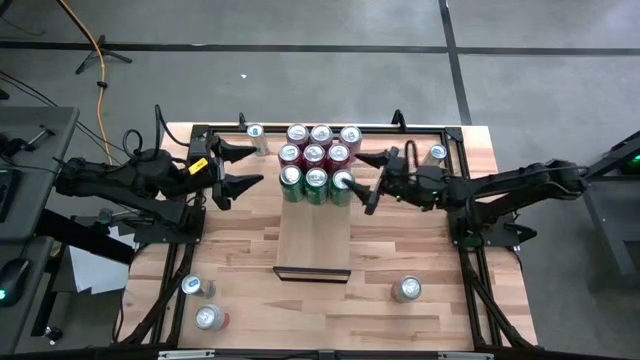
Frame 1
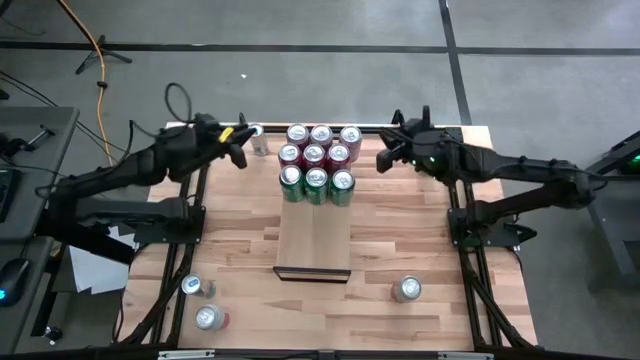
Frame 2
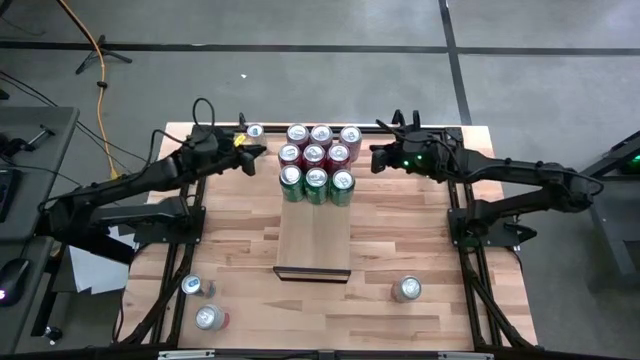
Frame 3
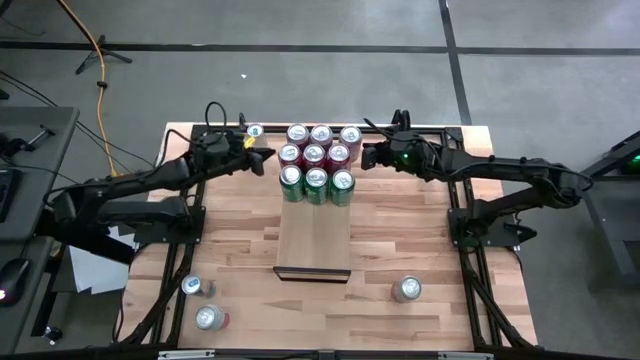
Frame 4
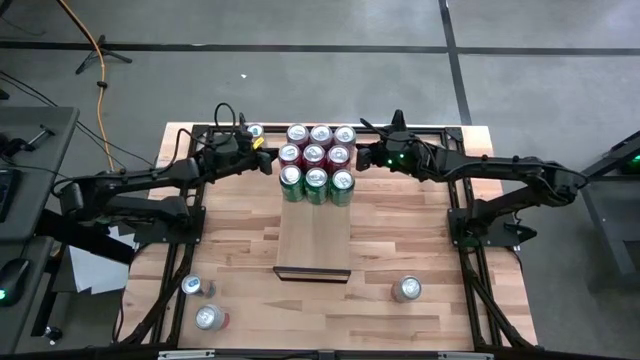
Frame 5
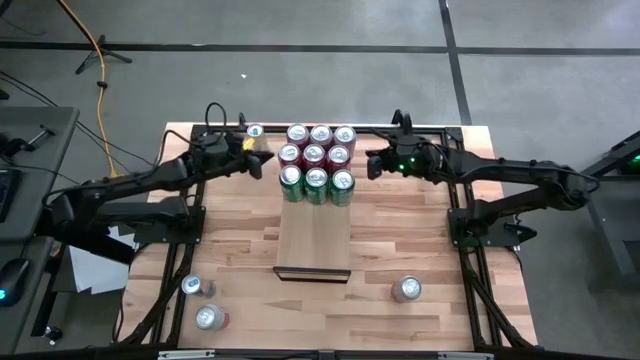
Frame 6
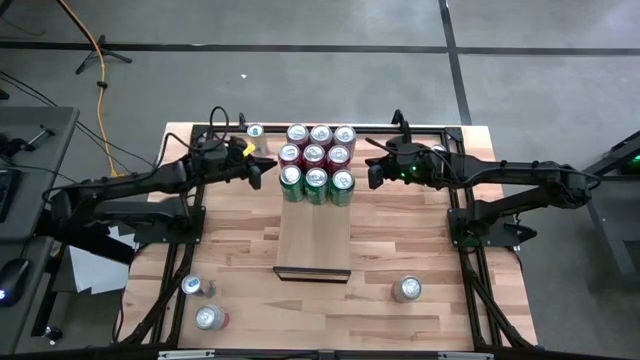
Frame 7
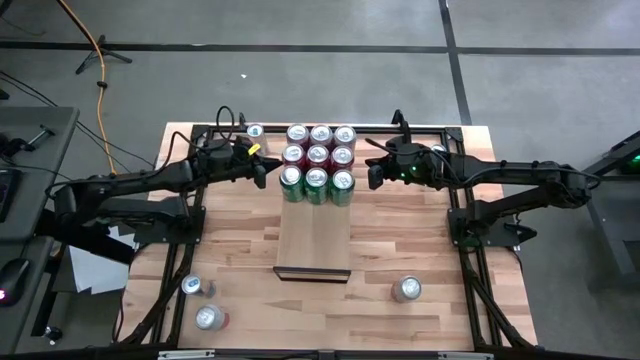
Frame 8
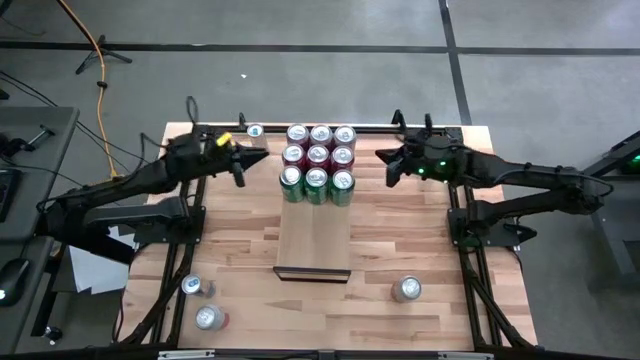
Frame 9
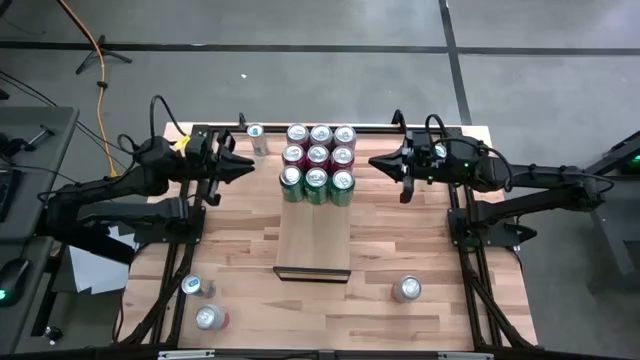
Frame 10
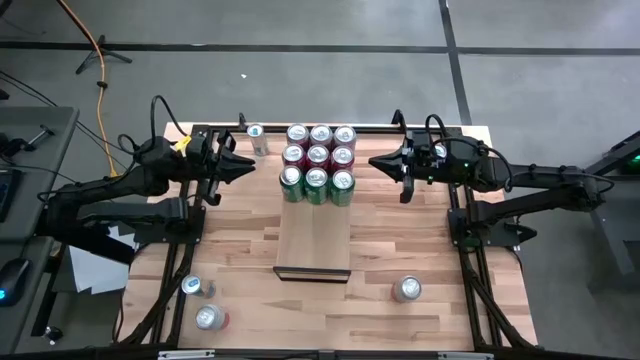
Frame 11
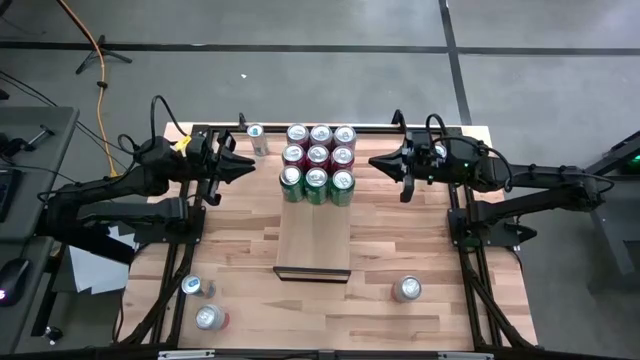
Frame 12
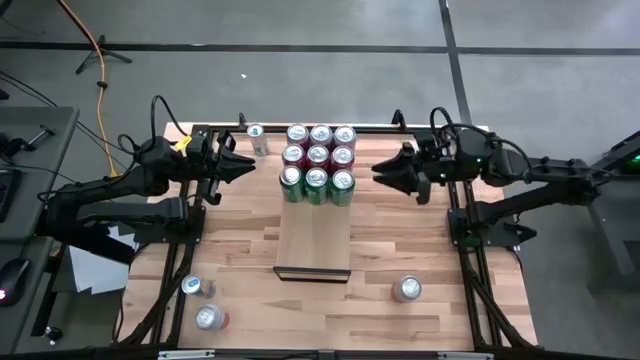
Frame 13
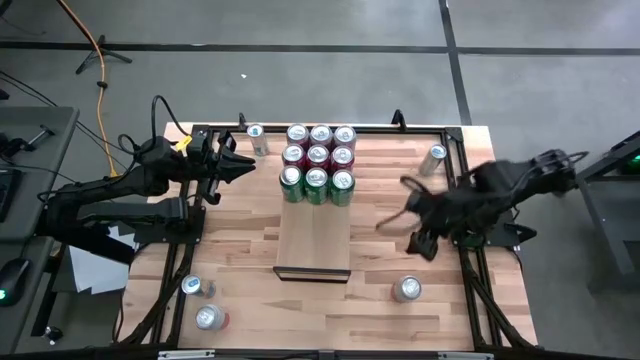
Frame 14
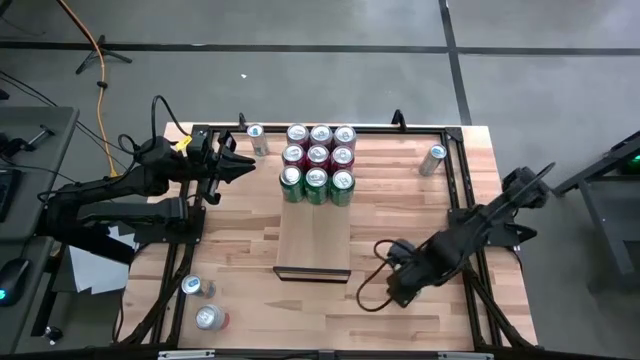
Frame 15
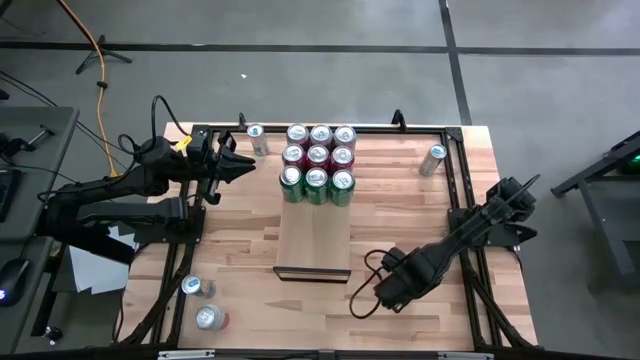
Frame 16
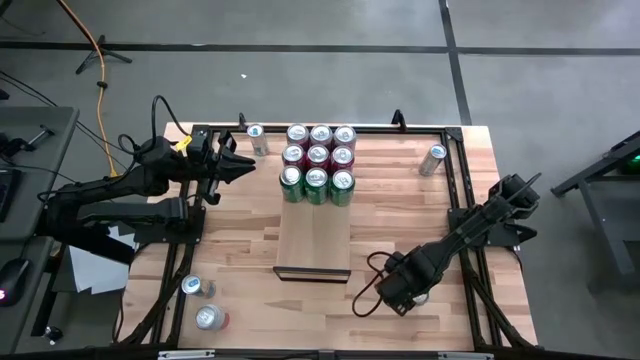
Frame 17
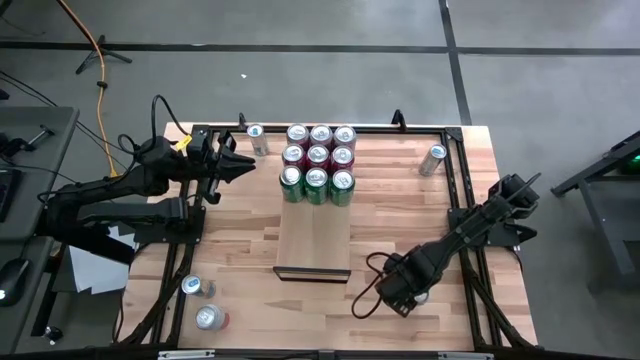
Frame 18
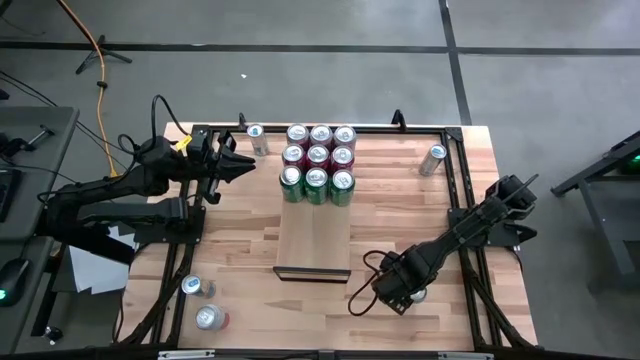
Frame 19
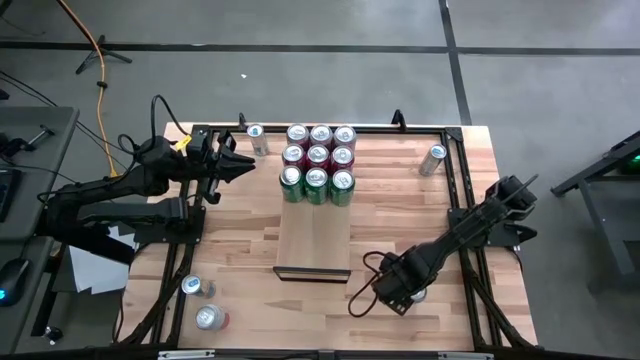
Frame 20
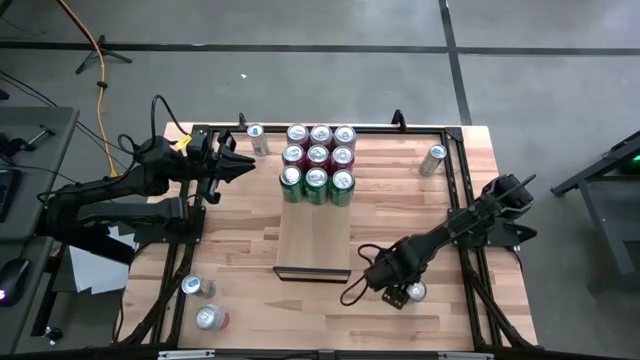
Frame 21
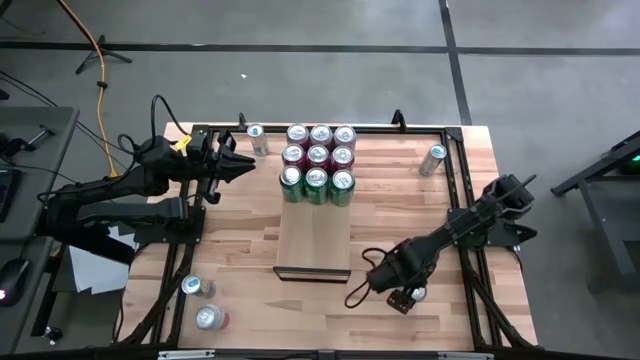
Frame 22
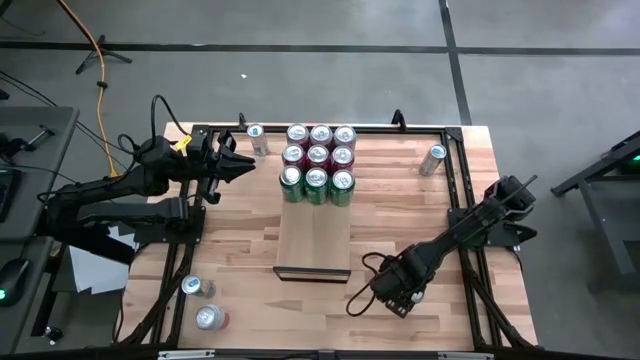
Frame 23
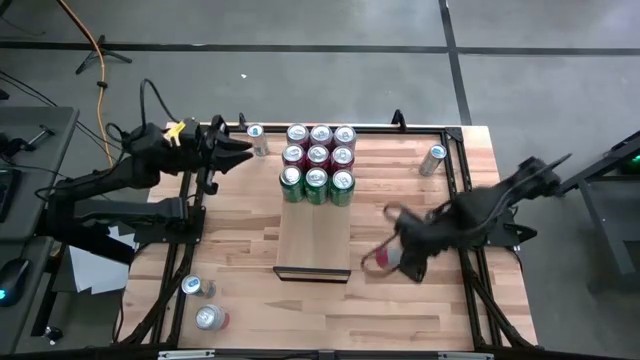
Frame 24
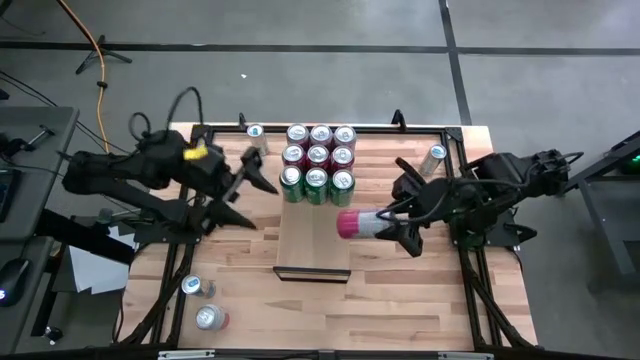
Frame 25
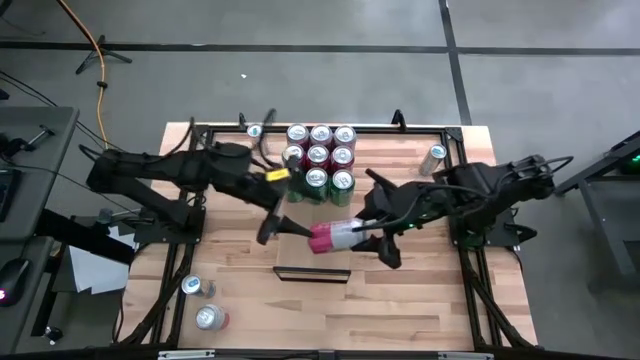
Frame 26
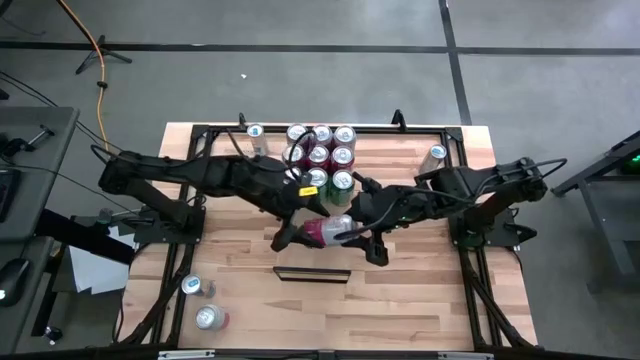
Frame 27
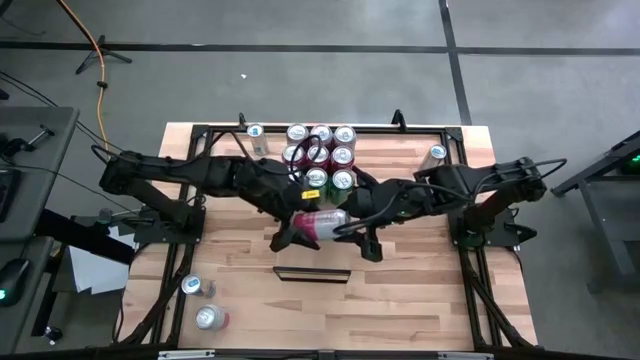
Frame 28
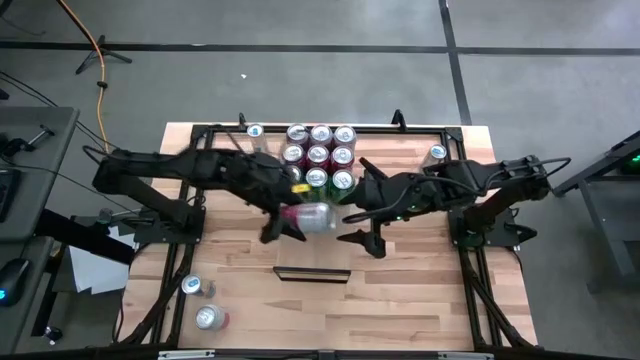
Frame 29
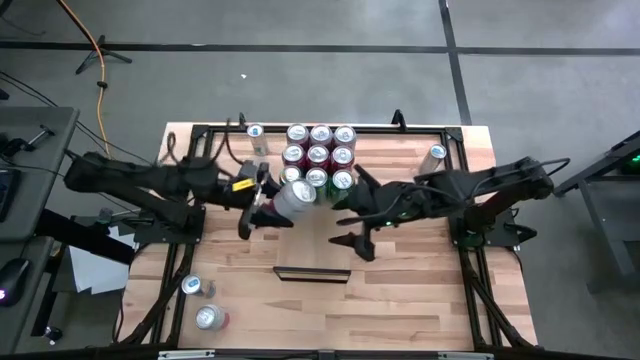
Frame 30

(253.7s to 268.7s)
Task: Place canned beverage on shelf
Put the bottom right pink white soda can on the shelf

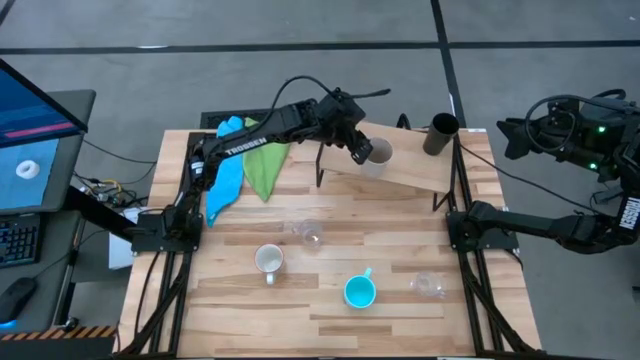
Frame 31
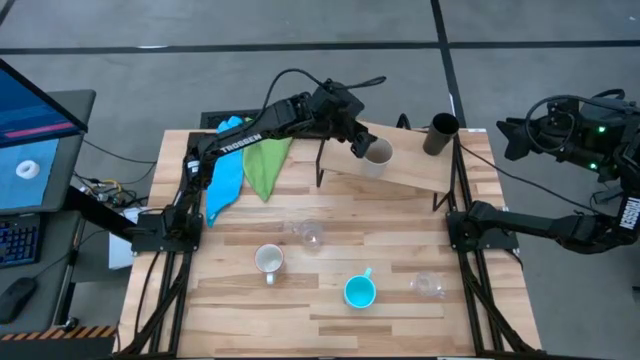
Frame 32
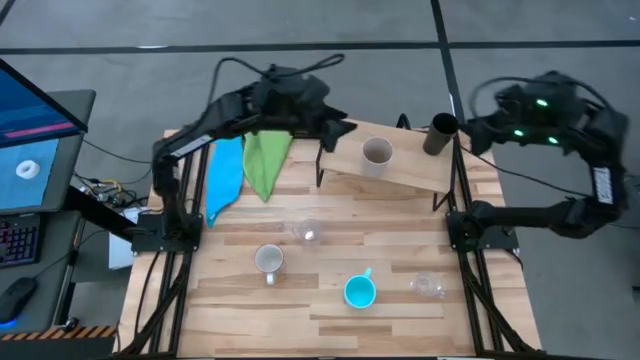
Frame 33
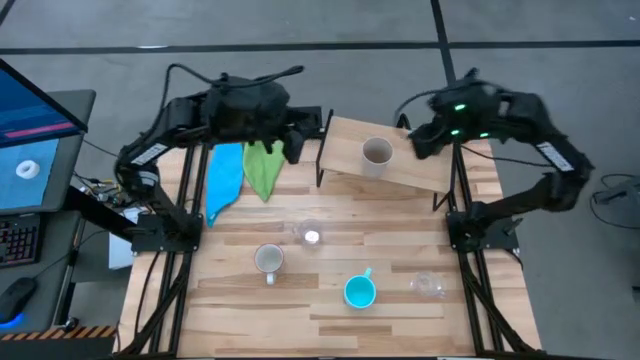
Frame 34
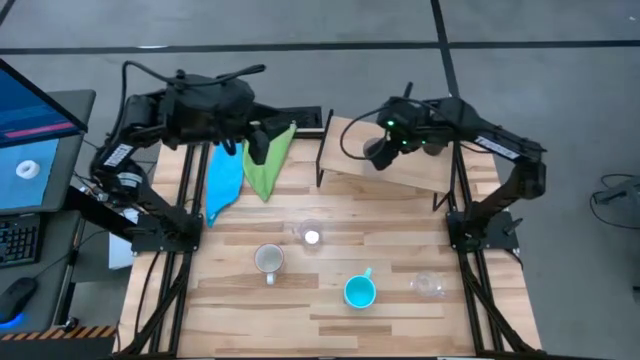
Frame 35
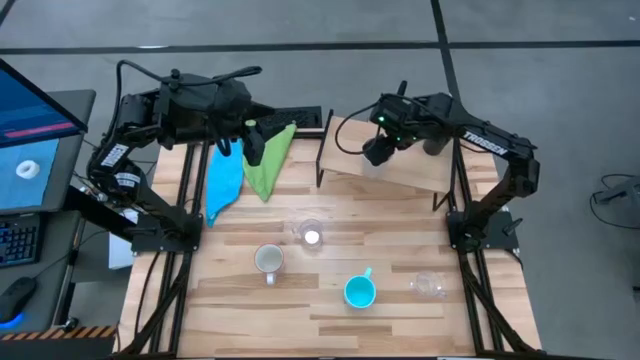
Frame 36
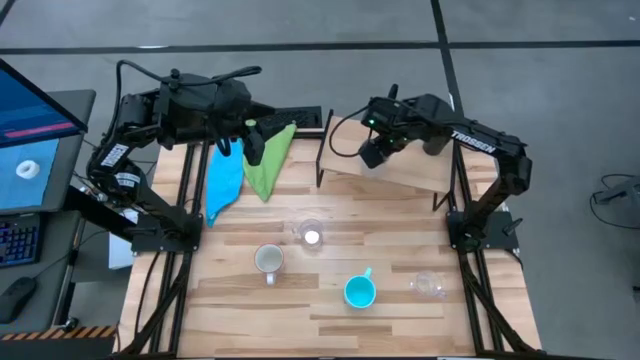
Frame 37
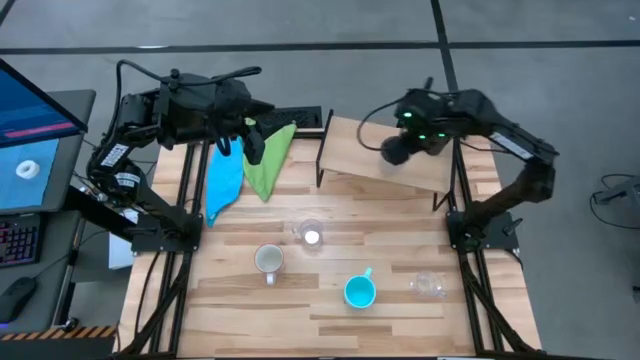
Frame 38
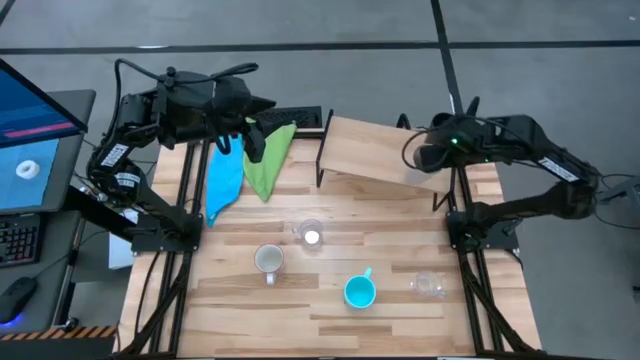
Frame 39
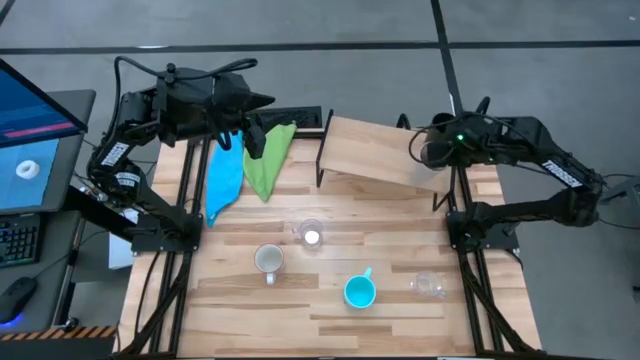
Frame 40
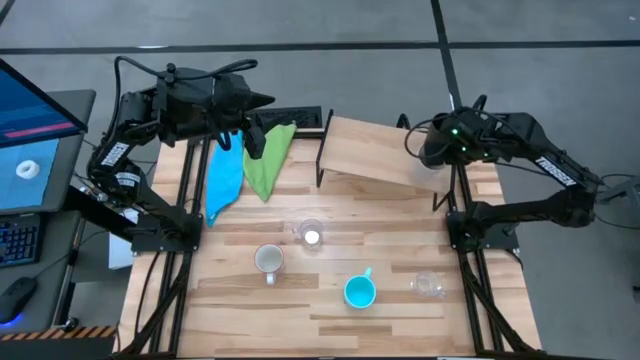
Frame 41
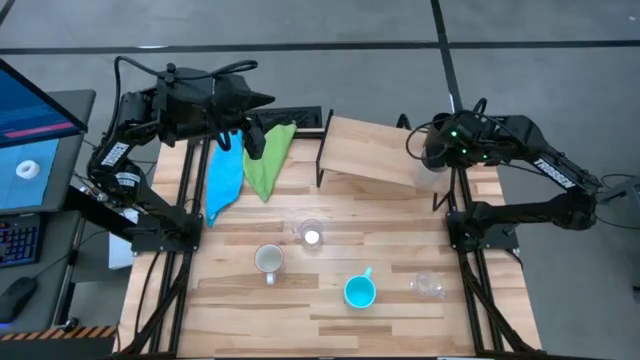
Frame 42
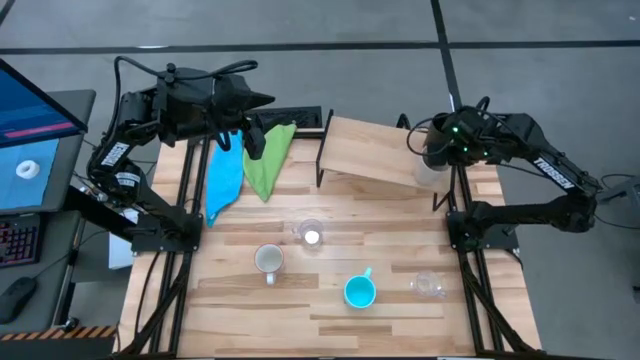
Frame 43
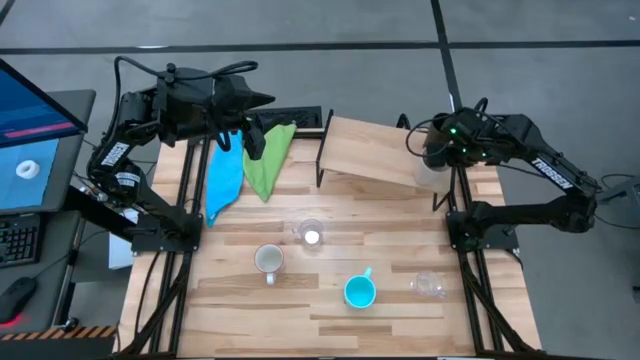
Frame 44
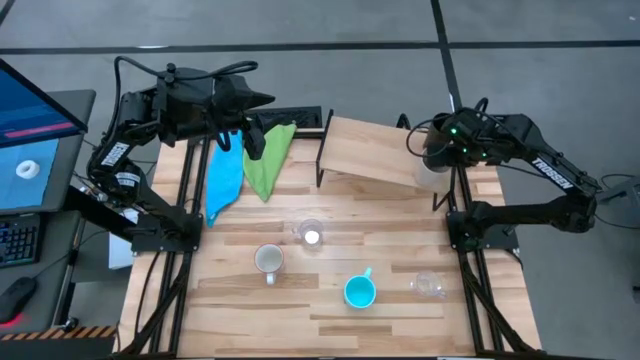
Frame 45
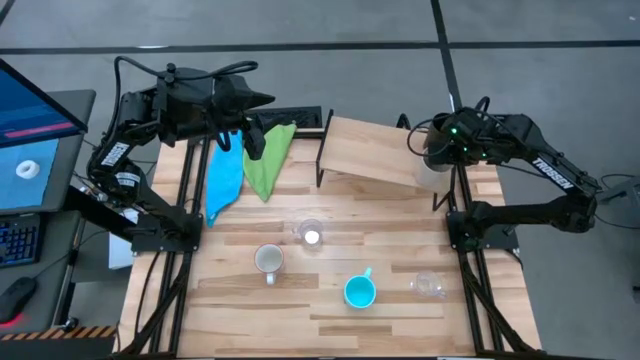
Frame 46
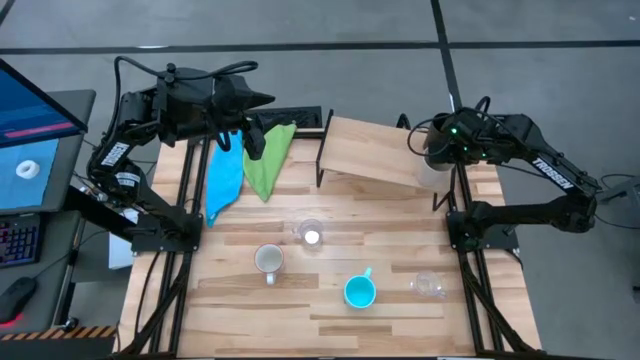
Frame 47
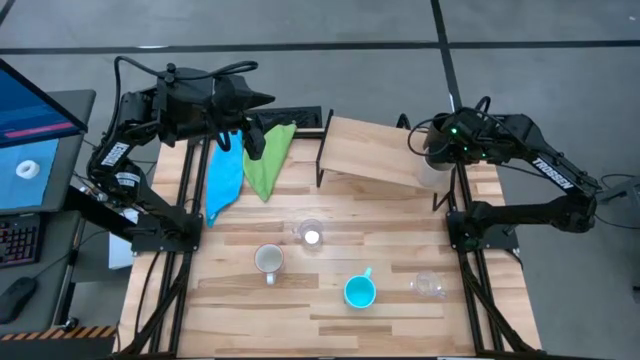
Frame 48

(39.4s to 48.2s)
Task: Stack small to large cups/mugs on shelf
Move the white cup to the bottom right of the shelf
